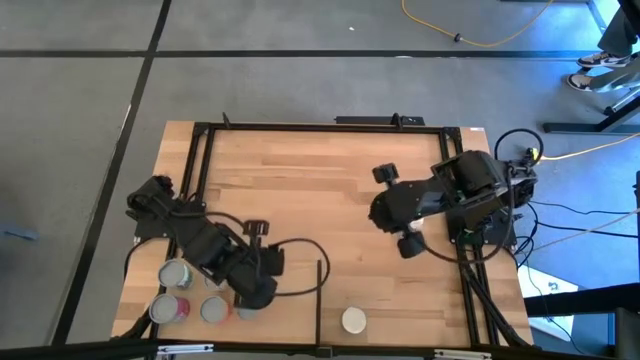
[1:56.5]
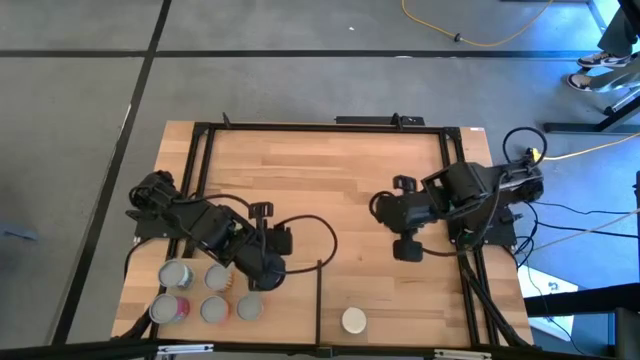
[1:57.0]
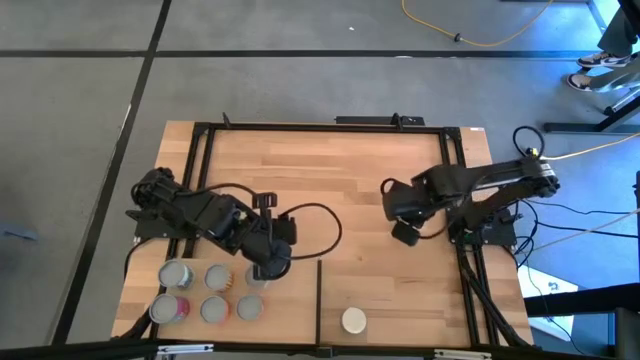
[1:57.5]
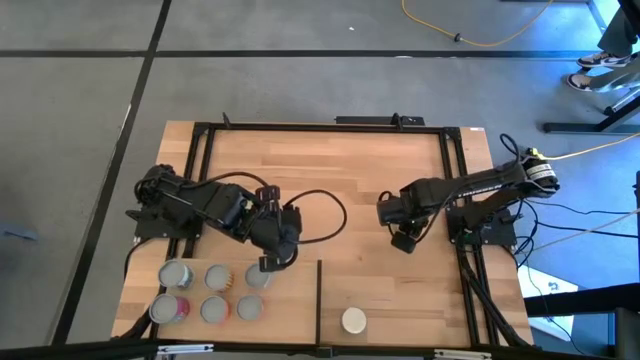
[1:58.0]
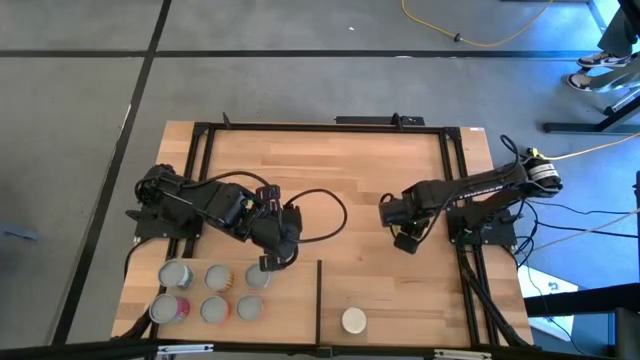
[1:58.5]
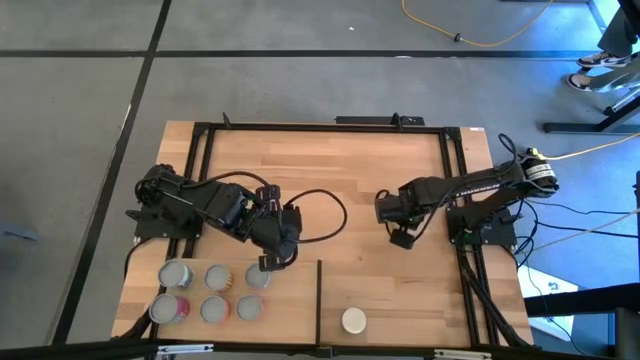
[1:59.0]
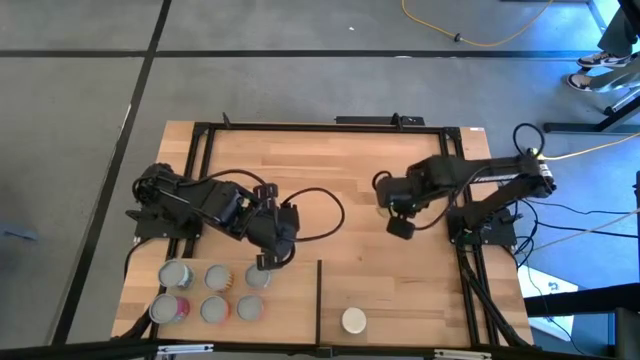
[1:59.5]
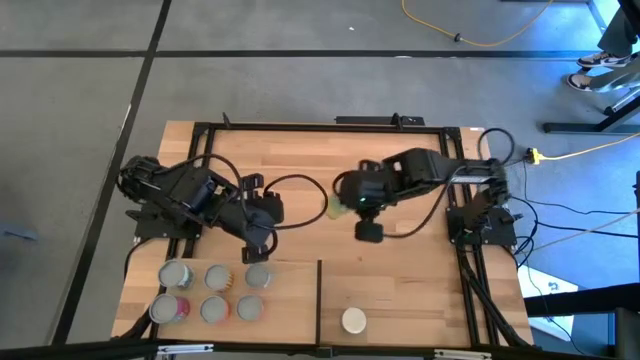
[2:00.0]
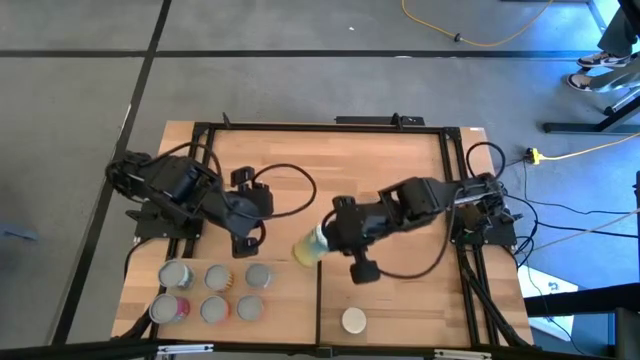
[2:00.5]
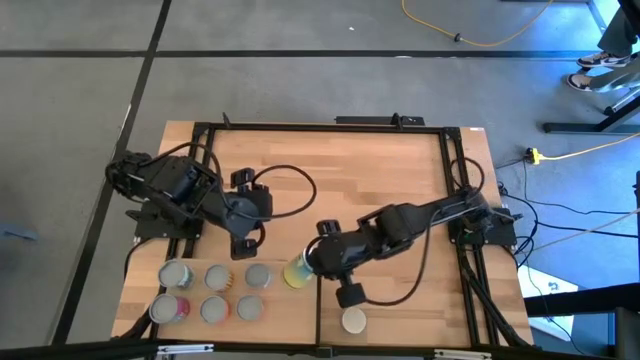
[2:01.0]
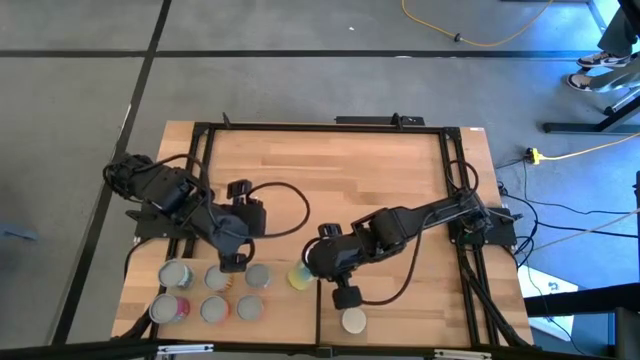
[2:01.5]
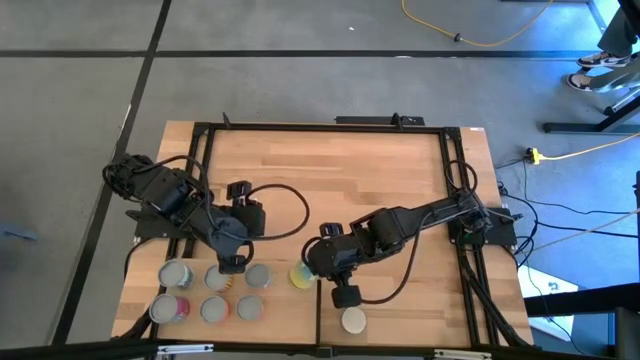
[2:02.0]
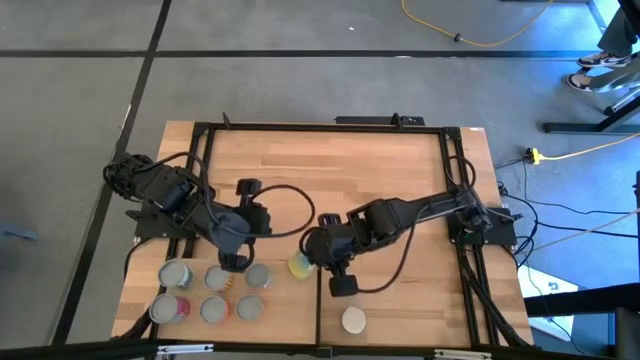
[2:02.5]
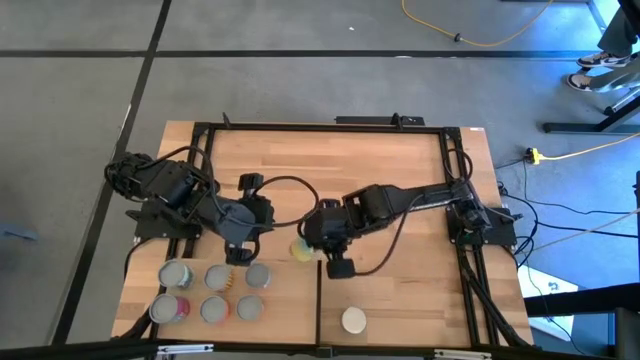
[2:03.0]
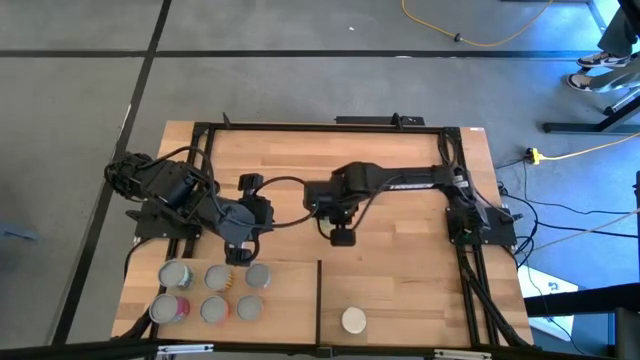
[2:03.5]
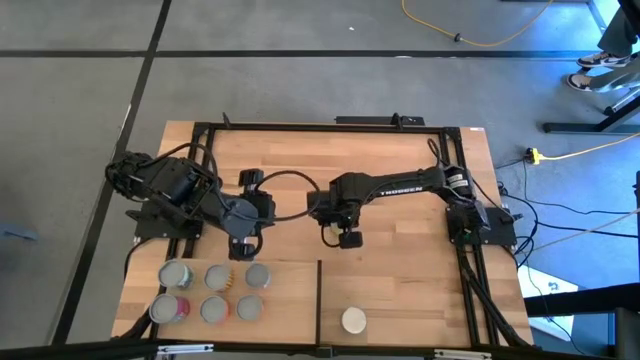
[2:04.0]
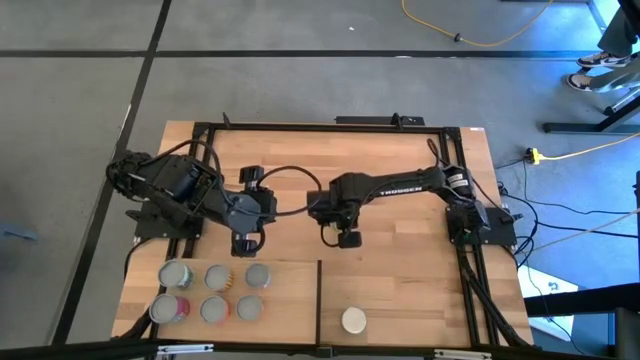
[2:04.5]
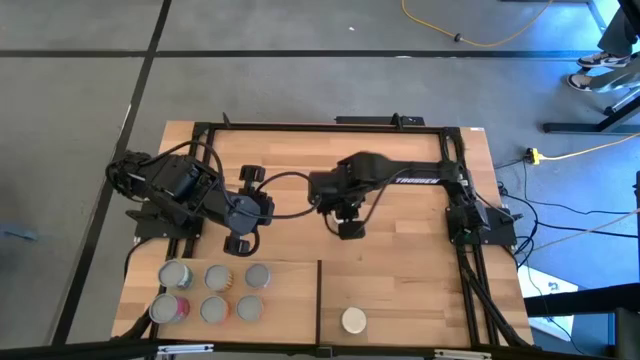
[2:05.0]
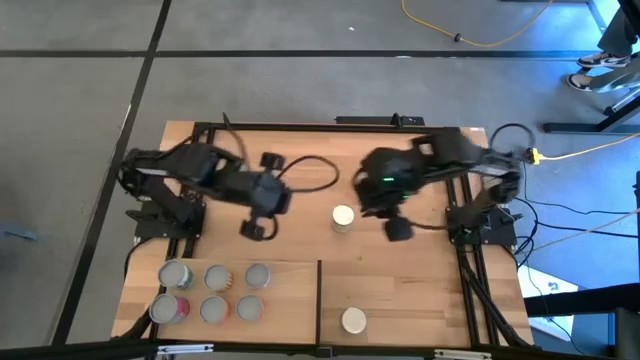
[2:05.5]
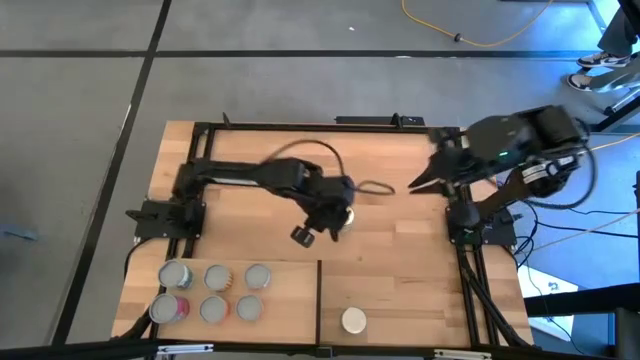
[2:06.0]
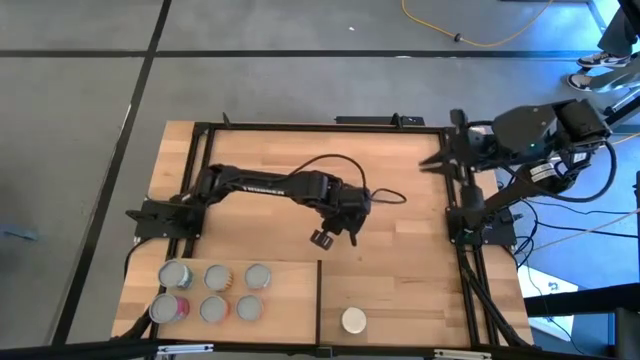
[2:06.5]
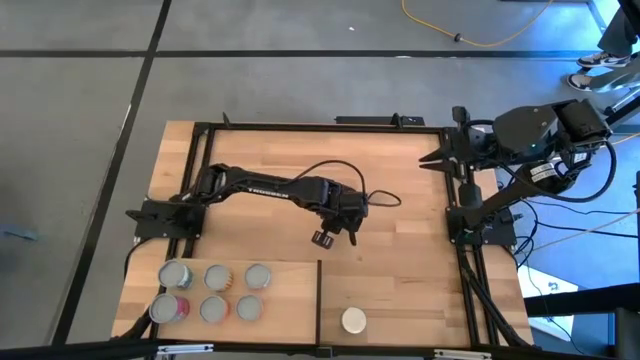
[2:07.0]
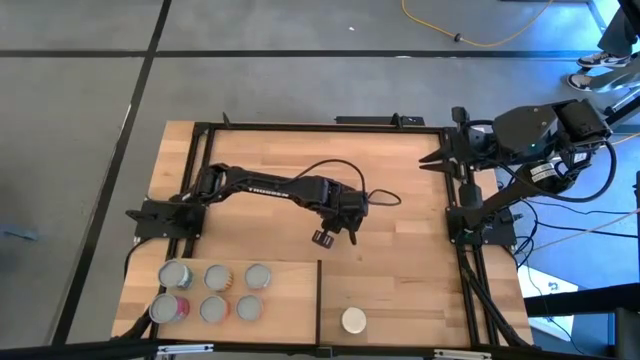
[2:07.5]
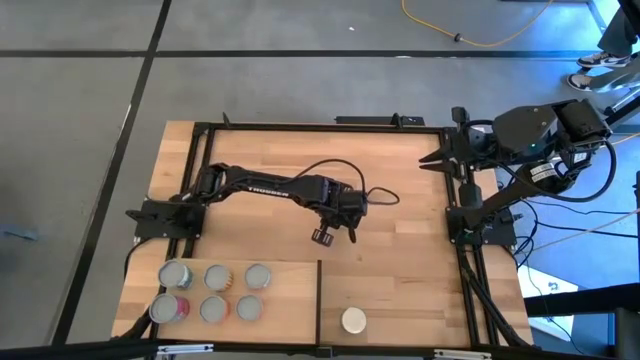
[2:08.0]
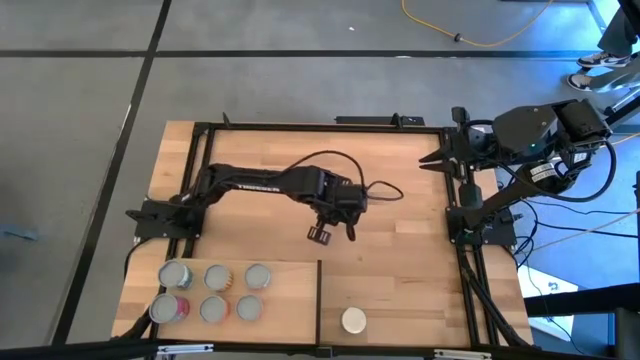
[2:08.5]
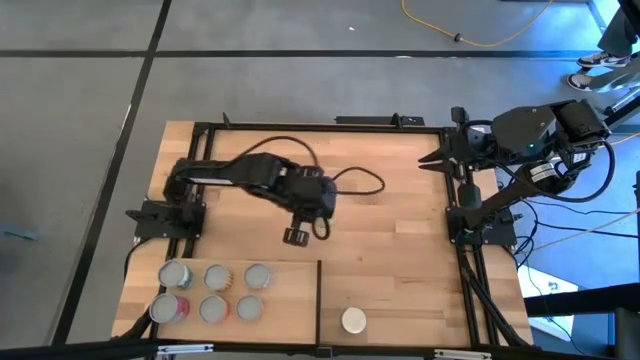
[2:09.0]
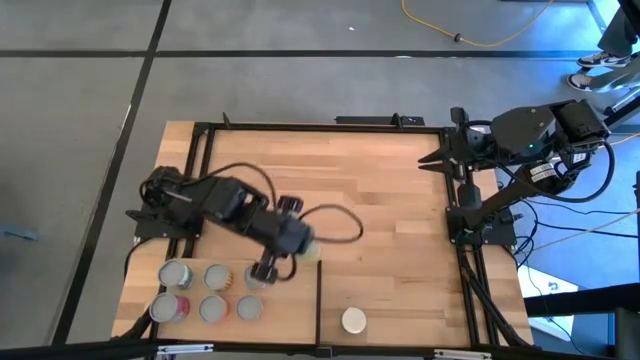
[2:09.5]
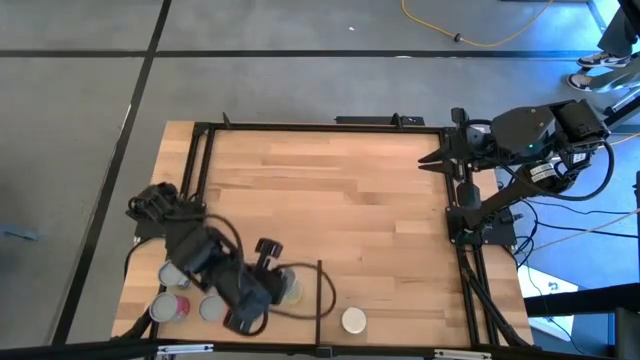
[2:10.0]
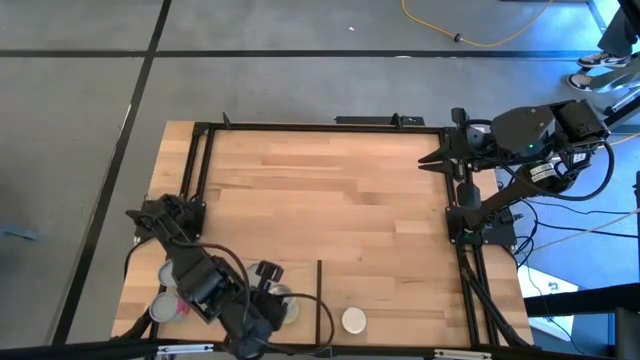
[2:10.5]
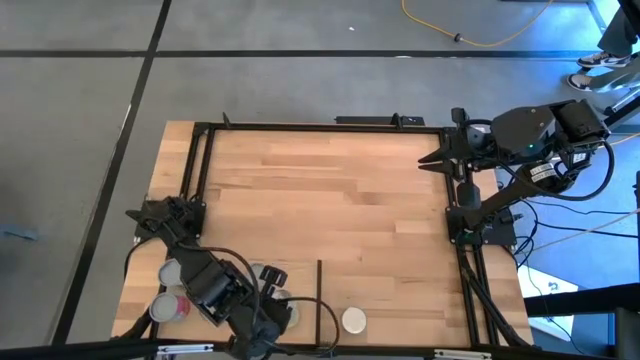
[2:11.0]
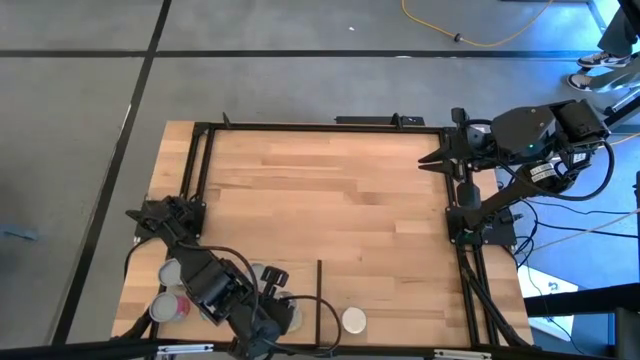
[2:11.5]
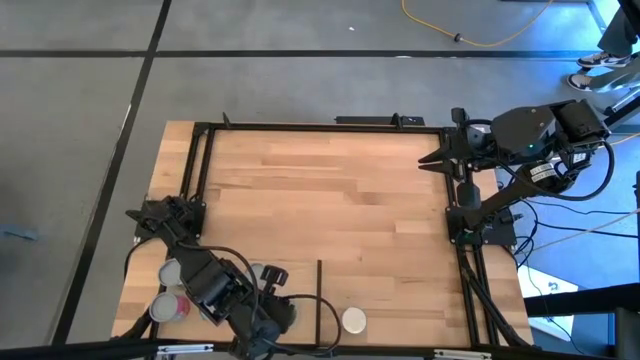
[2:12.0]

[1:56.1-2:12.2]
Task: Pick and place cans onto a shelf
Put the canned carrots on the shelf

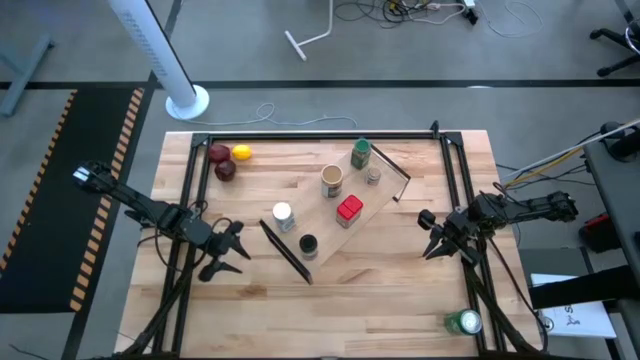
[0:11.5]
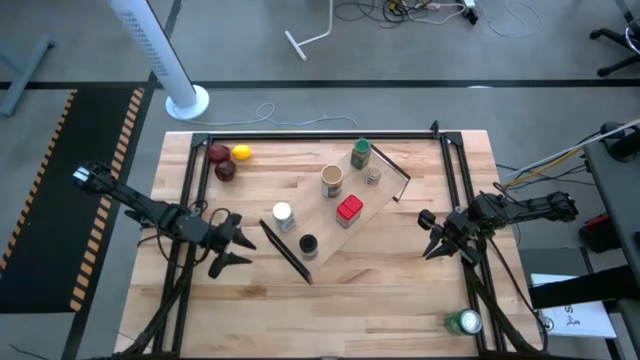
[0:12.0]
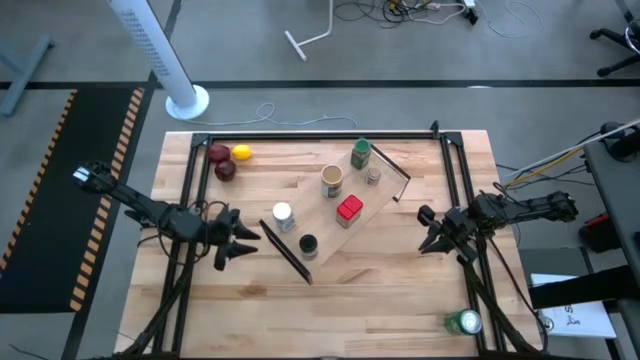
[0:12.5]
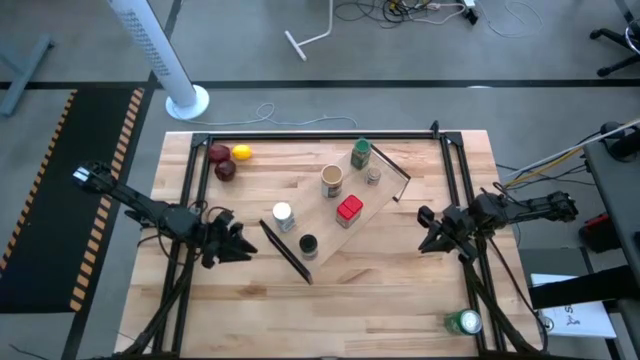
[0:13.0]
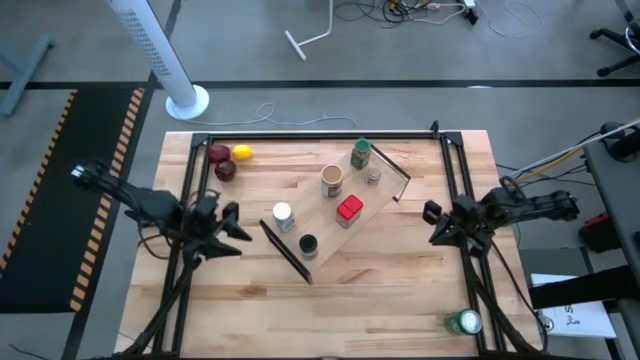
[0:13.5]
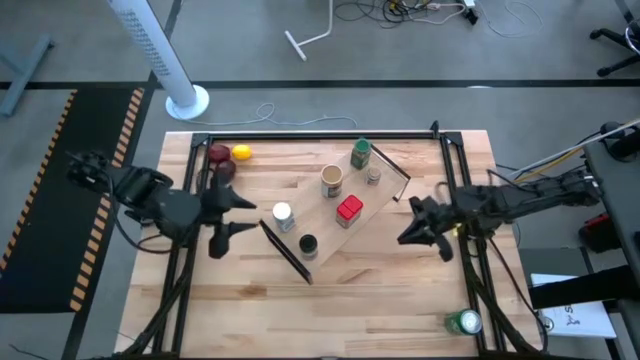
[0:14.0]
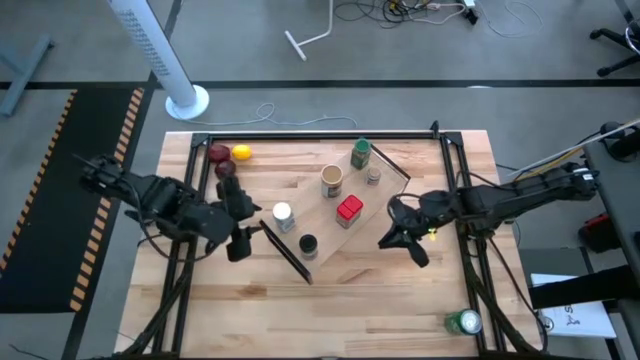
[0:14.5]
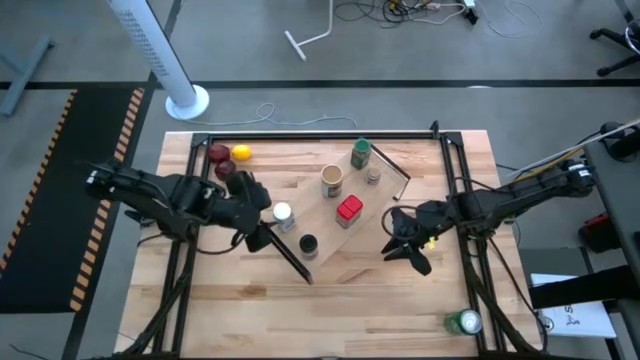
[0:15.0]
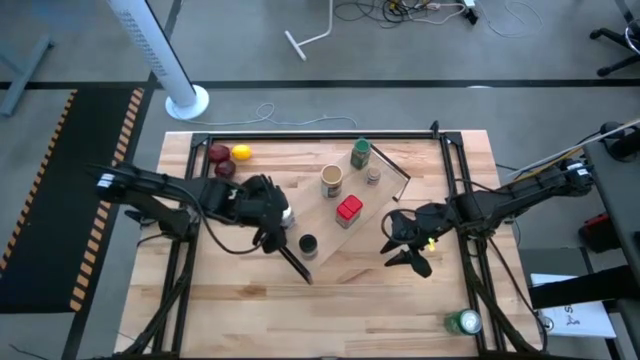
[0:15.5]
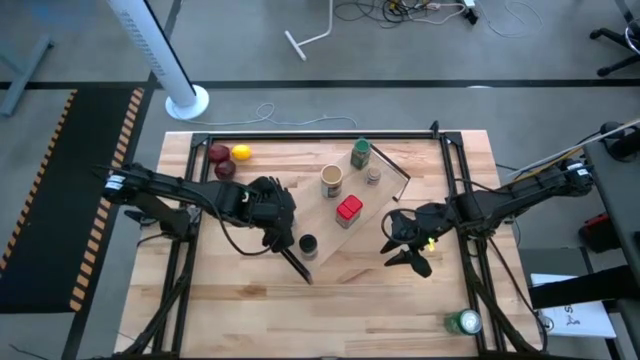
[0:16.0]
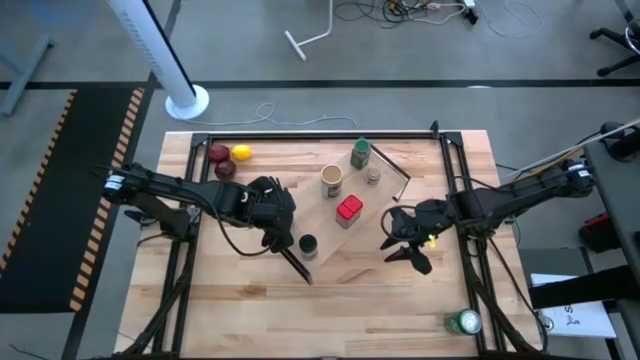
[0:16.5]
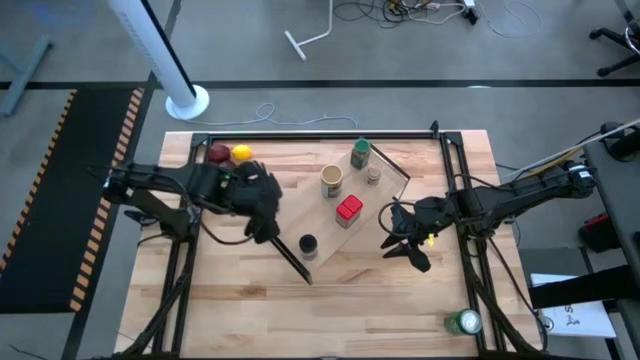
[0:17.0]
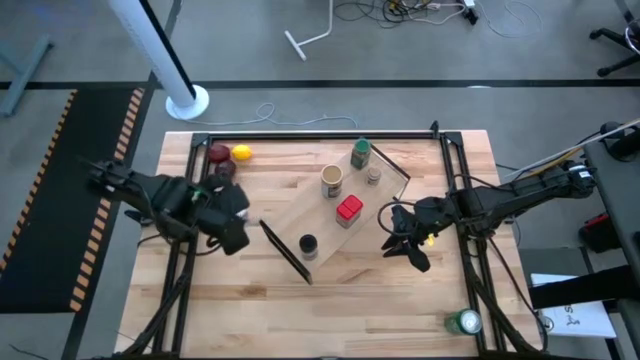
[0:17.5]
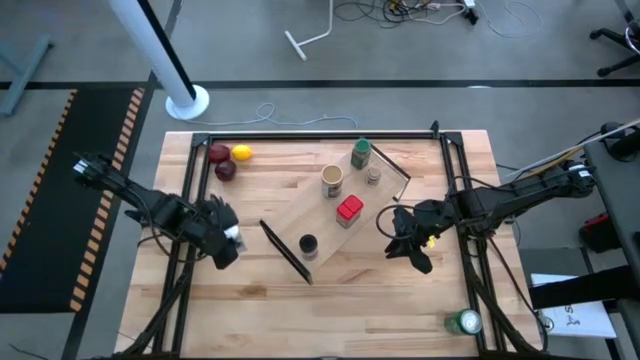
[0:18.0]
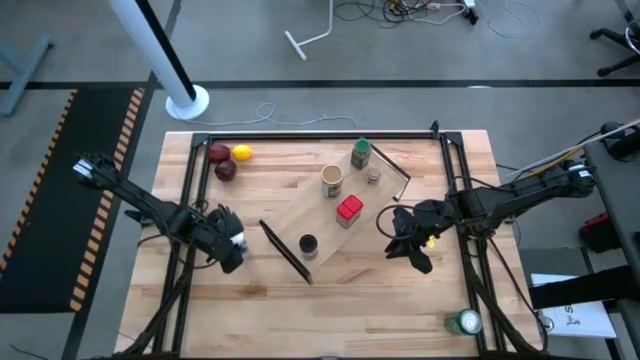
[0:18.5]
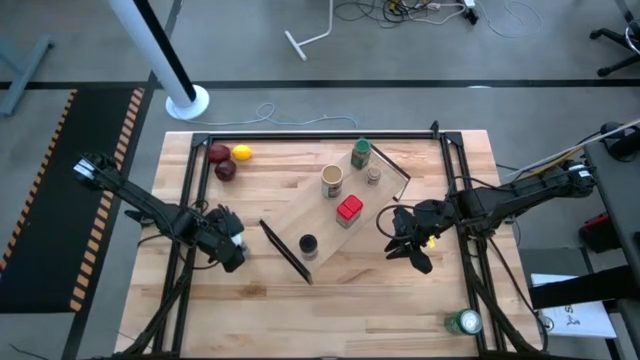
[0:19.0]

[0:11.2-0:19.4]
Task: Shelf spices
Remove the white seasoning bottle from the shelf
